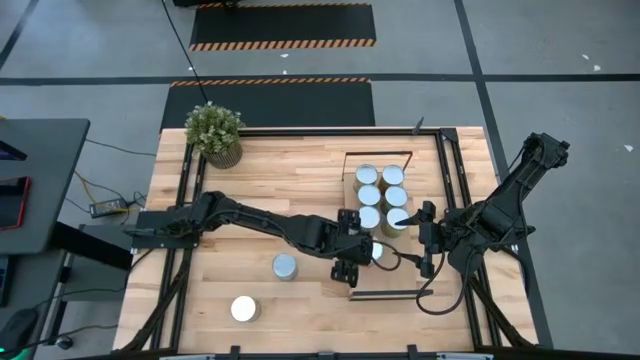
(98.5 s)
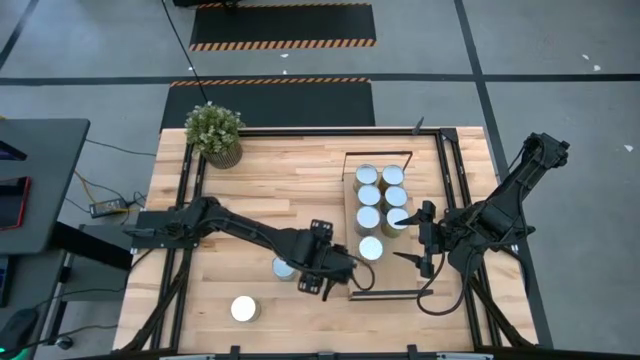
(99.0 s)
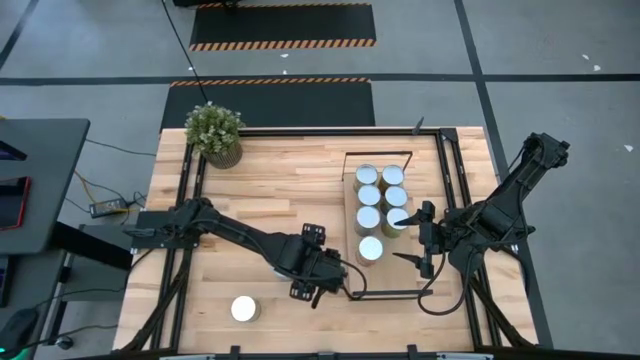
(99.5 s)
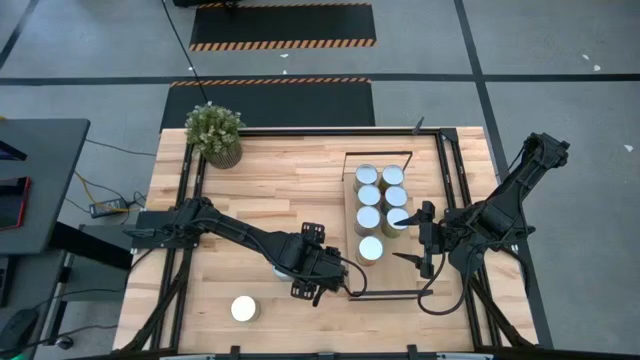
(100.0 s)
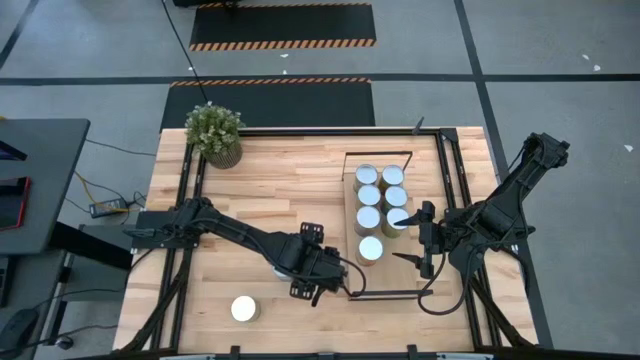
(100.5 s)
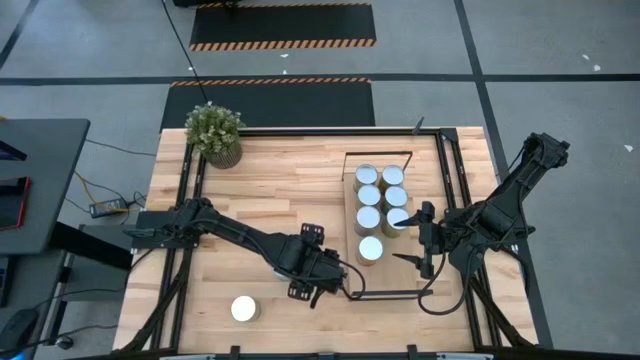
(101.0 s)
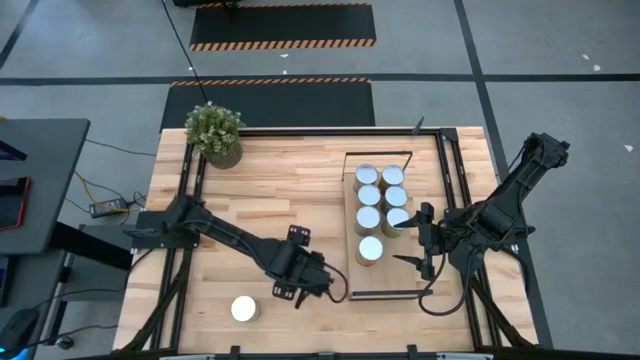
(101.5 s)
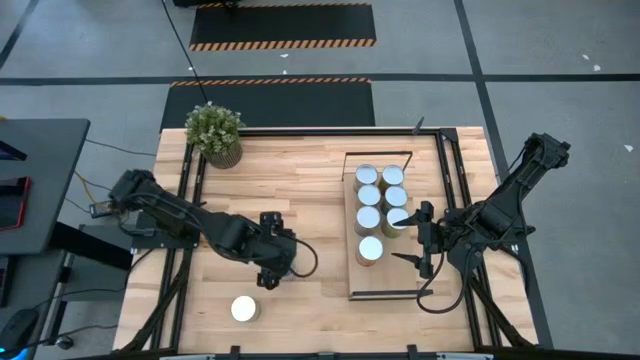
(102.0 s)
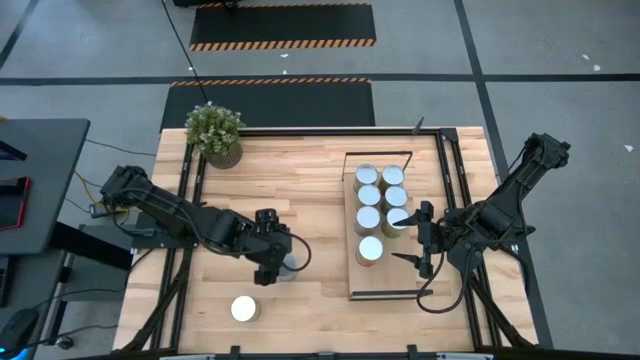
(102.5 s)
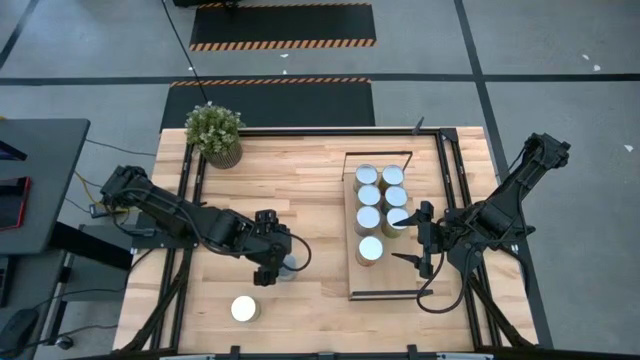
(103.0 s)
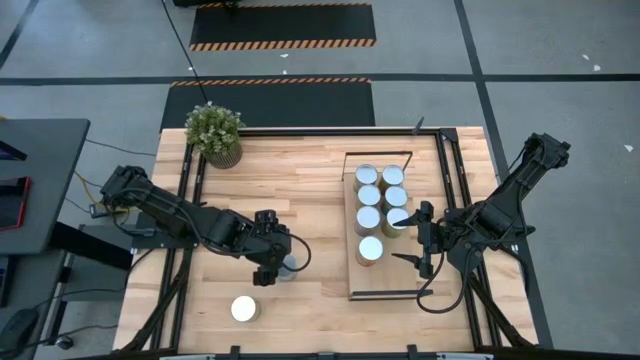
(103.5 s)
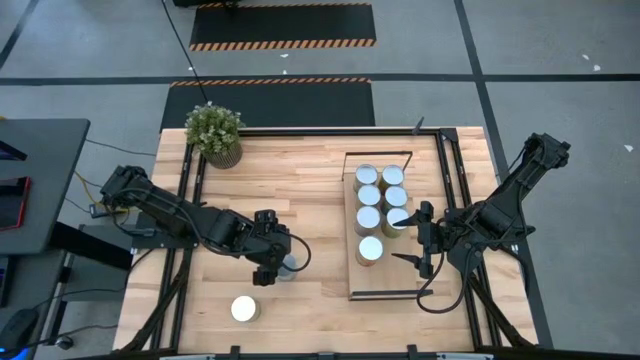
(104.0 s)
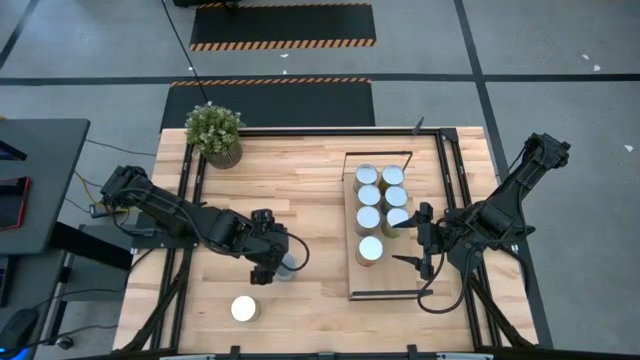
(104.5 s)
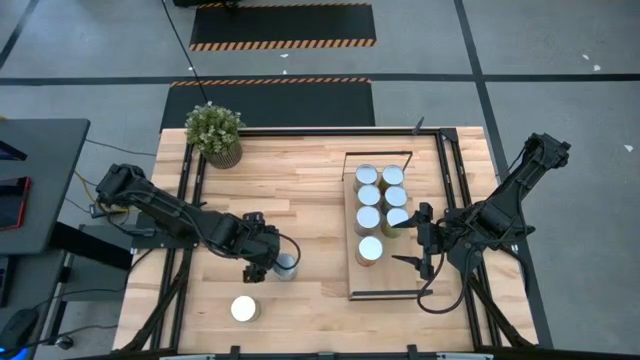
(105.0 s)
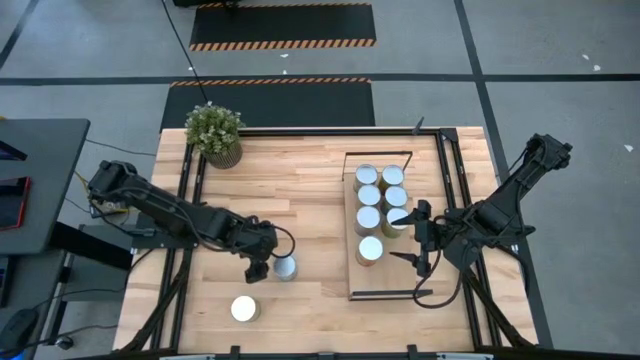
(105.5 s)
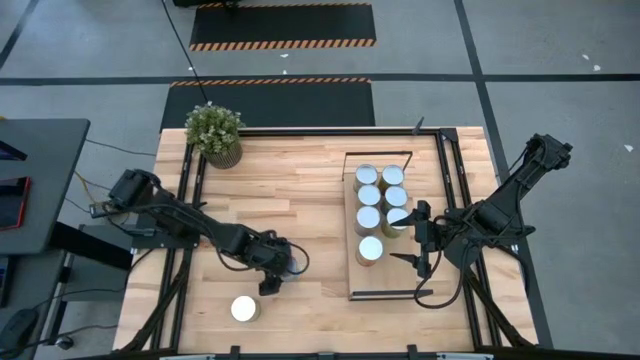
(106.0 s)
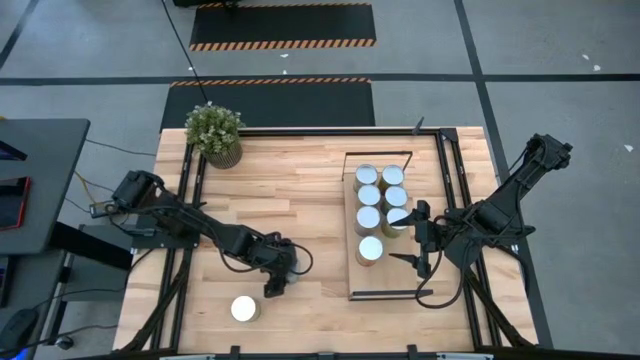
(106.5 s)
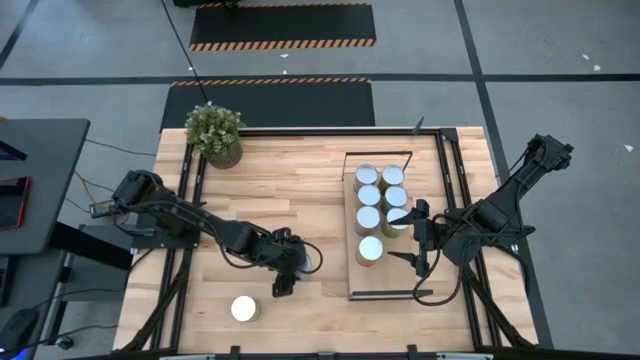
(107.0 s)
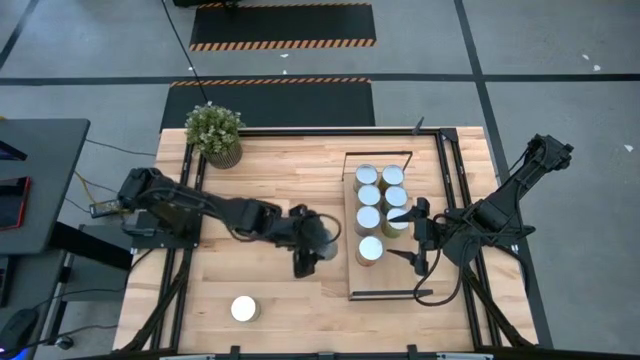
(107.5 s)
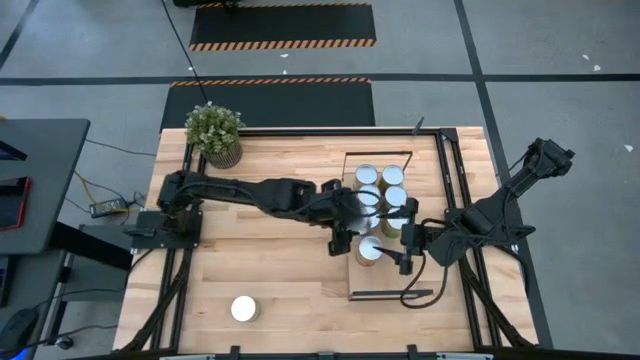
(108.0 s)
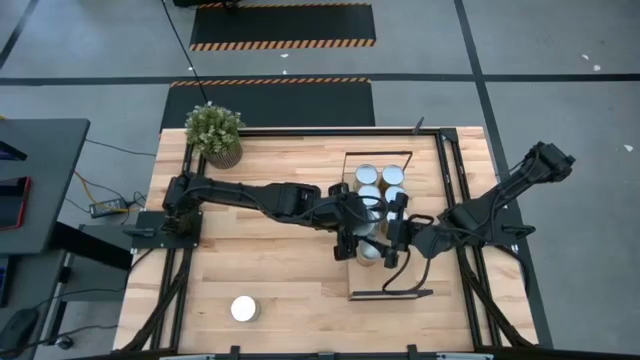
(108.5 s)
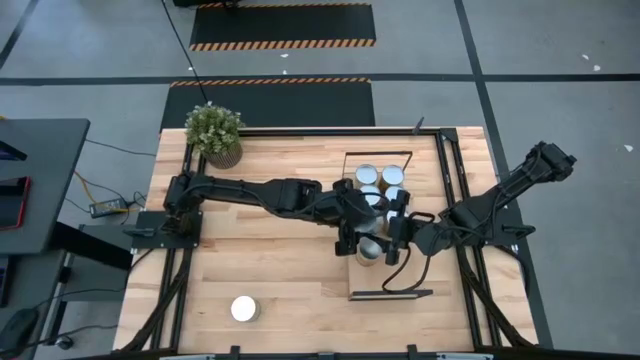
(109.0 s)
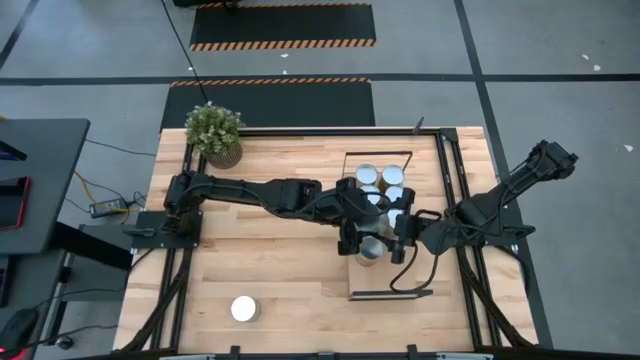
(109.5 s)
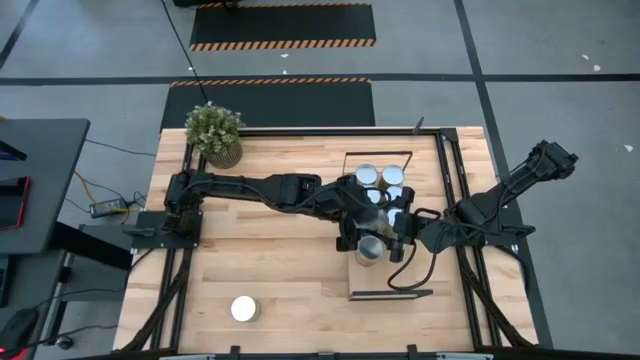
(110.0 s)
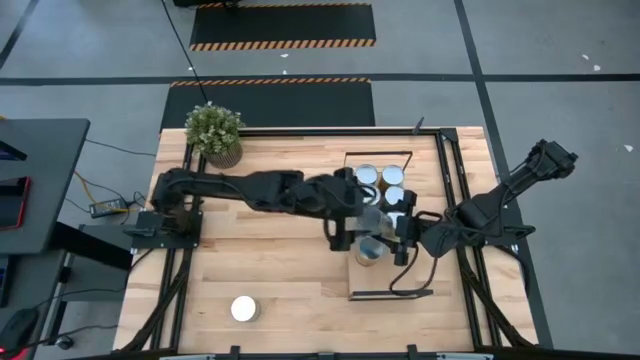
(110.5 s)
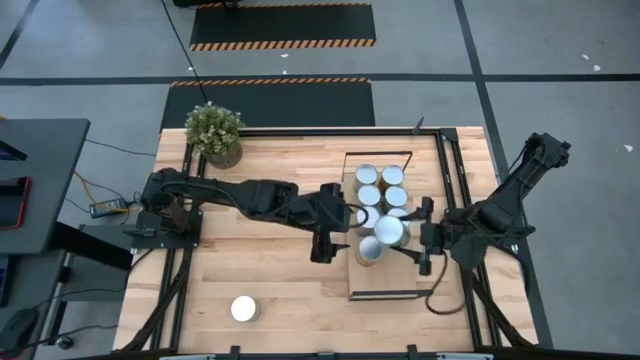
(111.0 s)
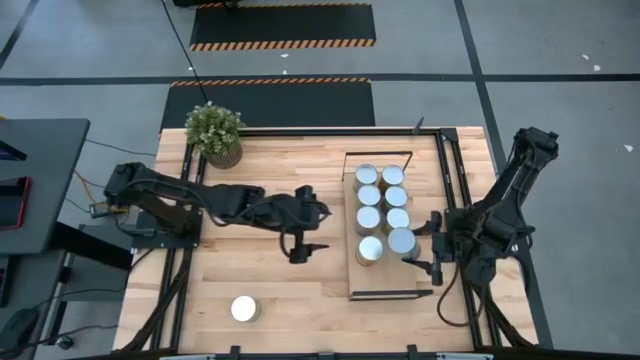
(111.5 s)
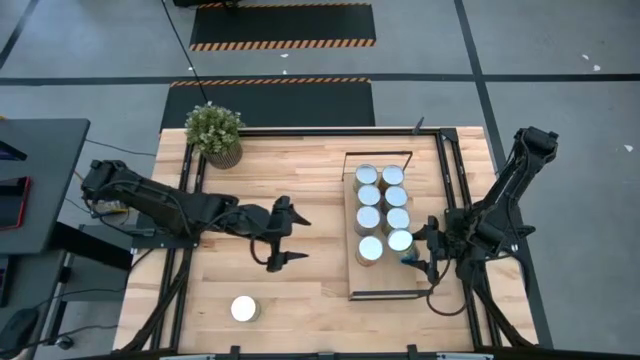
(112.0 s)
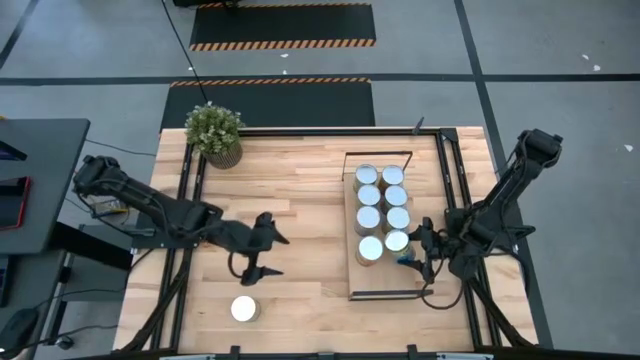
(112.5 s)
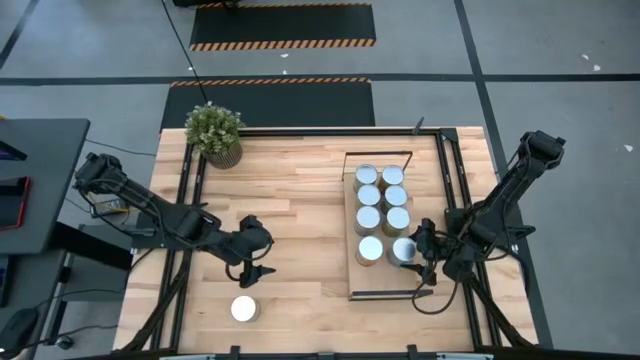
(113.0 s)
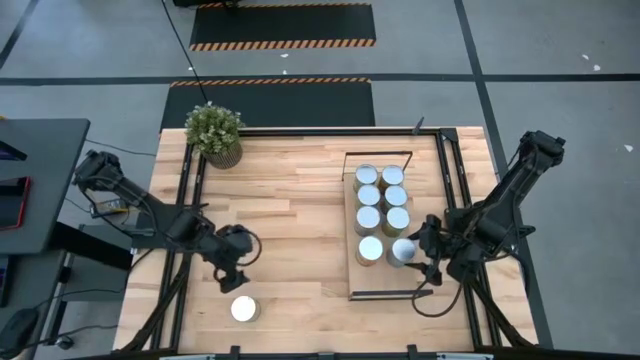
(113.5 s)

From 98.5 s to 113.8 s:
Task: Pick and place cans onto a shelf
Put the canned cherries on the shelf

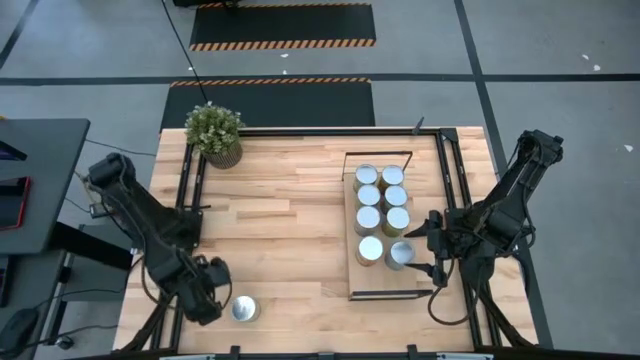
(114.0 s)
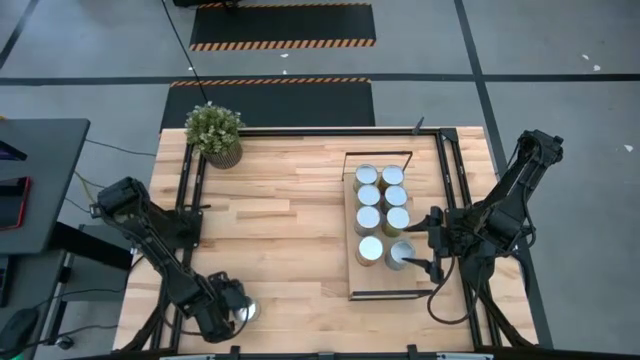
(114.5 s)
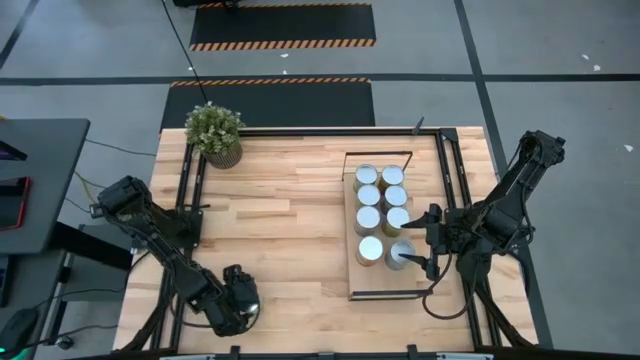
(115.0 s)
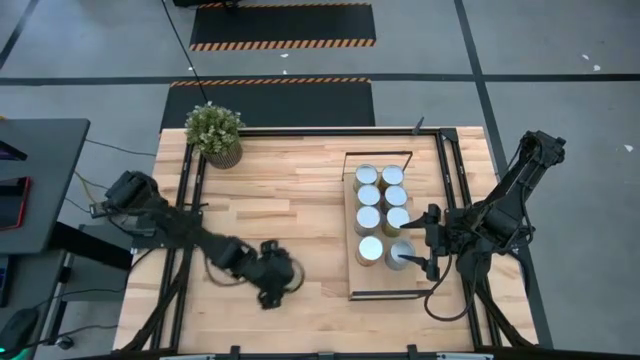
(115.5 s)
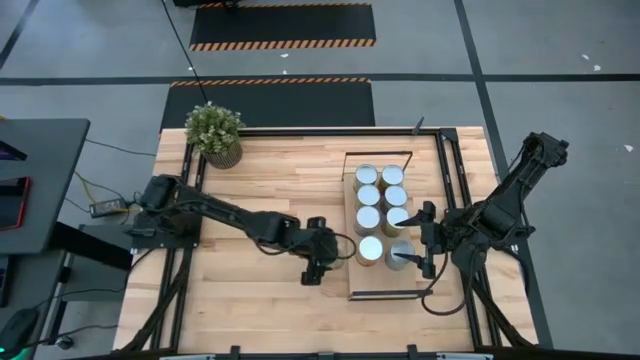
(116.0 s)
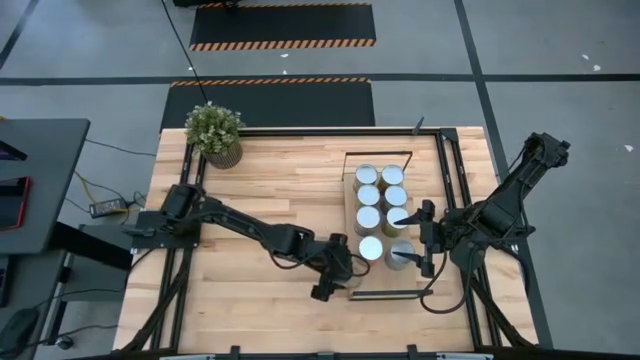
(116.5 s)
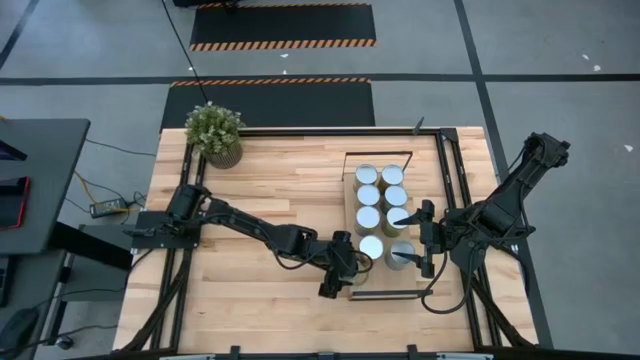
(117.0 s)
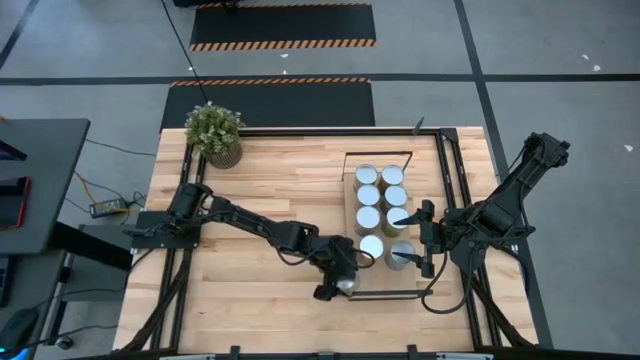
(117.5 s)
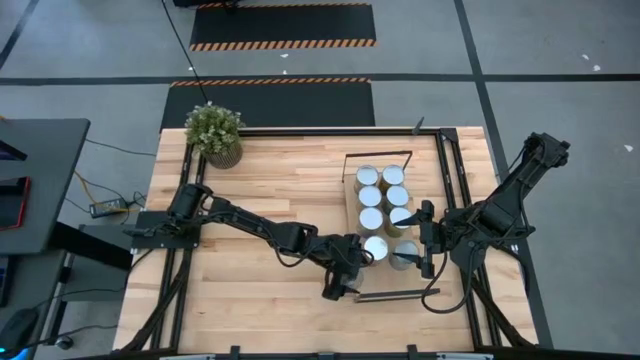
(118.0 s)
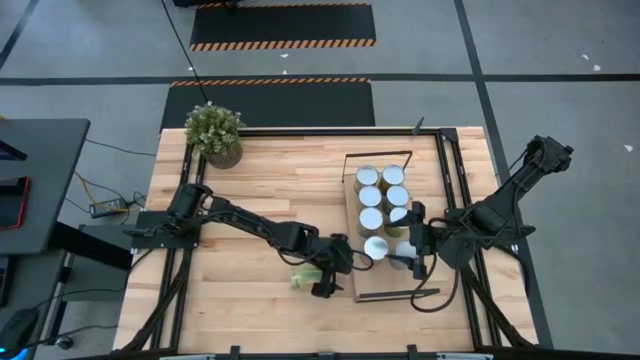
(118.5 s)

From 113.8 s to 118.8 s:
Put the canned oranges on the shelf

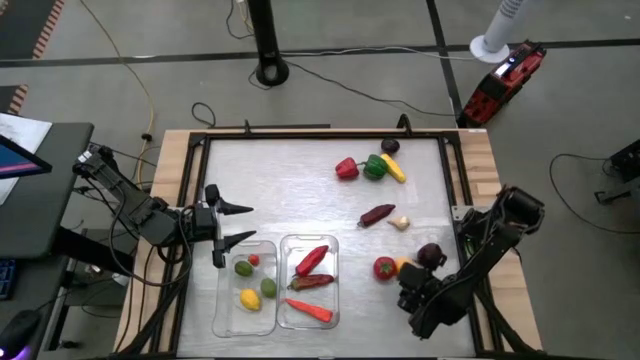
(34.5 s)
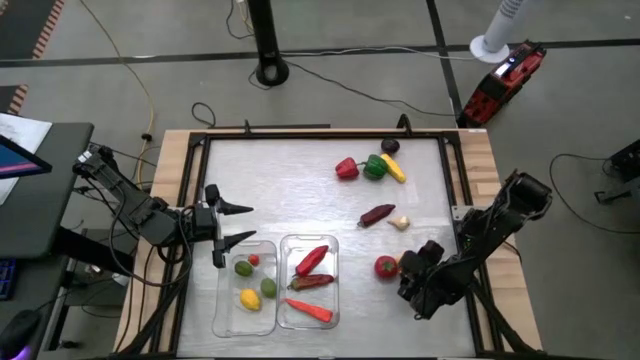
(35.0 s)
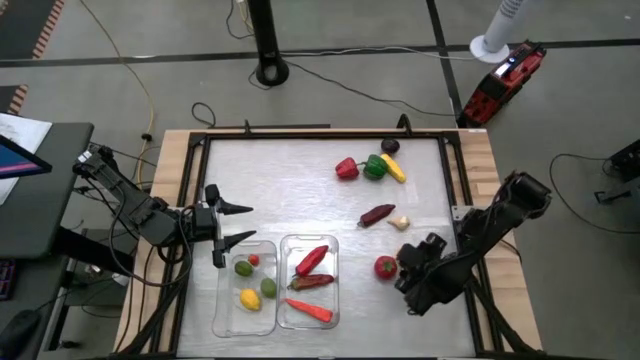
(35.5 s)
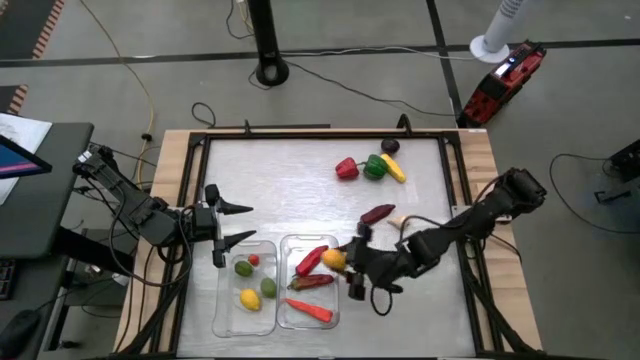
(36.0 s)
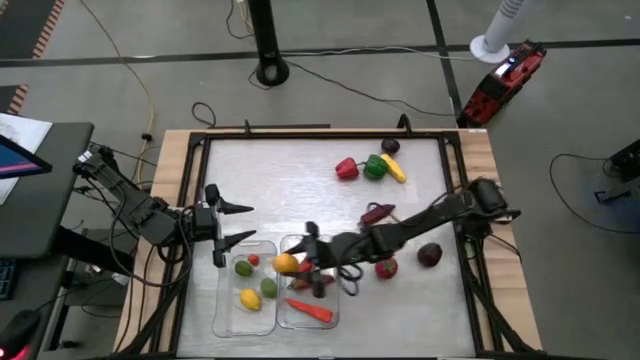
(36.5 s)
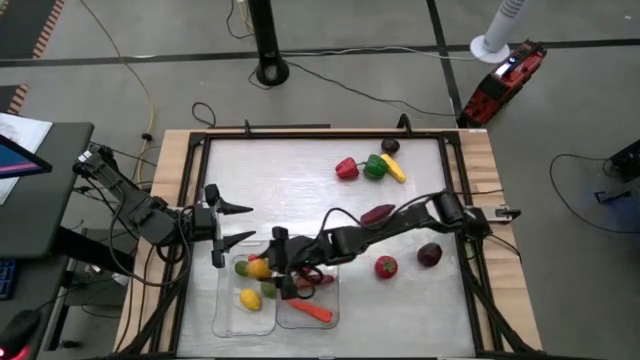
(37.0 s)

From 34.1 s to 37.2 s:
Task: Sort produce into baskets
Put the yellow lemon into the left transparent bin
